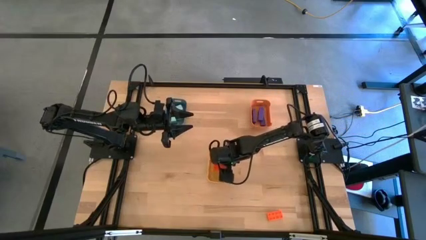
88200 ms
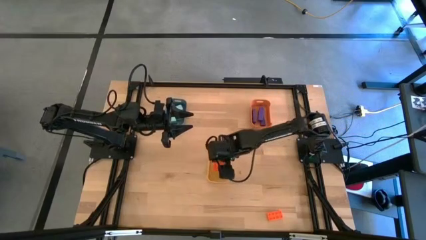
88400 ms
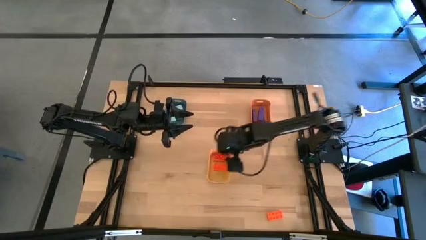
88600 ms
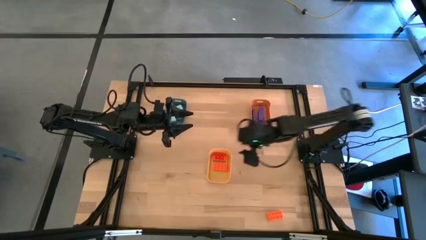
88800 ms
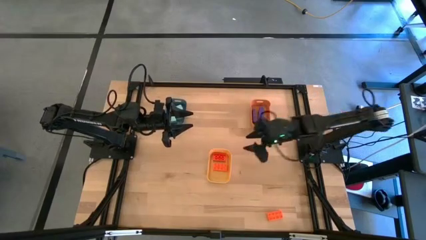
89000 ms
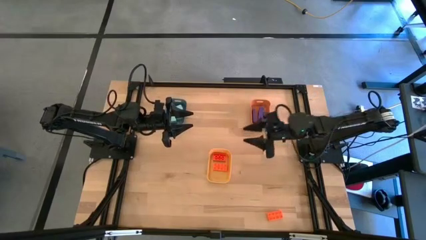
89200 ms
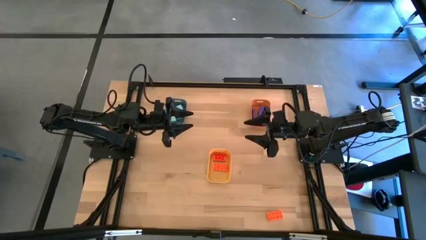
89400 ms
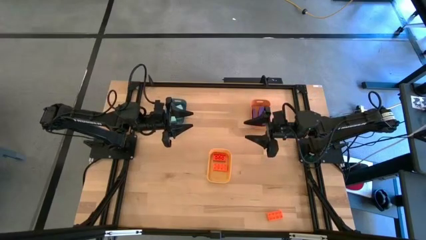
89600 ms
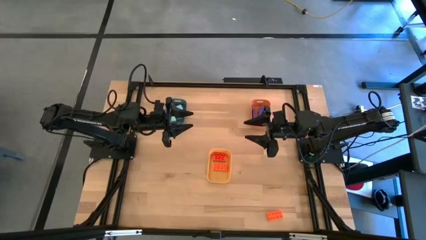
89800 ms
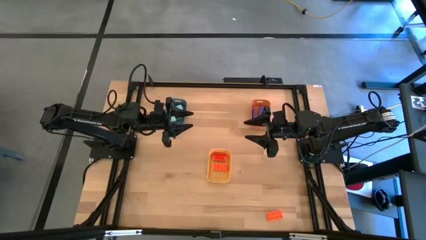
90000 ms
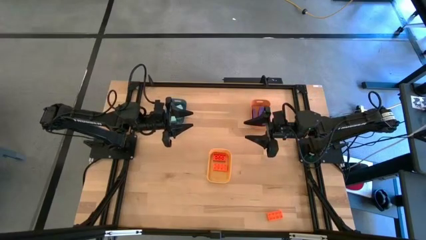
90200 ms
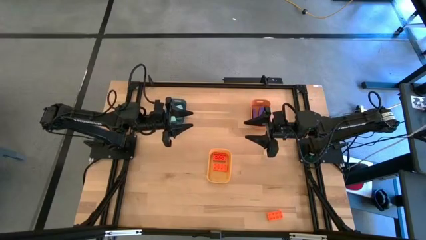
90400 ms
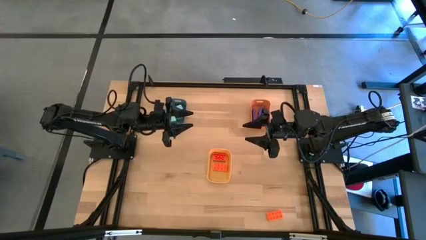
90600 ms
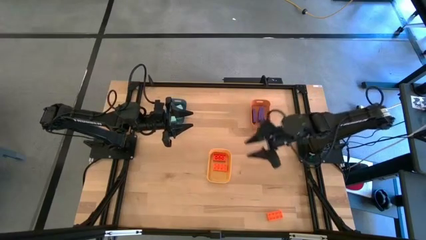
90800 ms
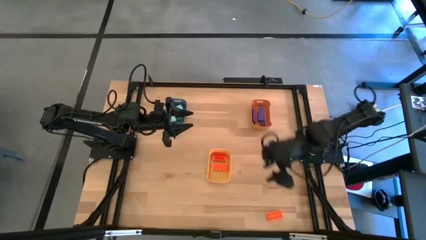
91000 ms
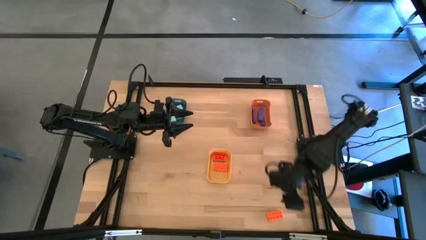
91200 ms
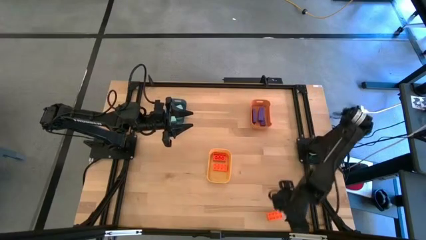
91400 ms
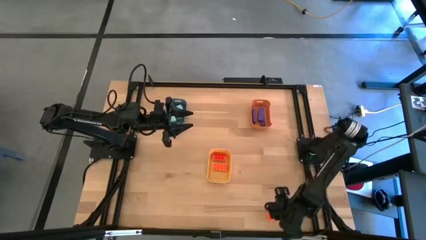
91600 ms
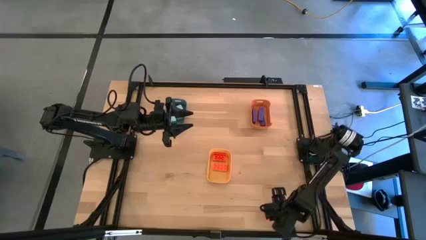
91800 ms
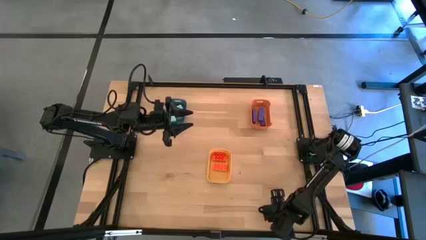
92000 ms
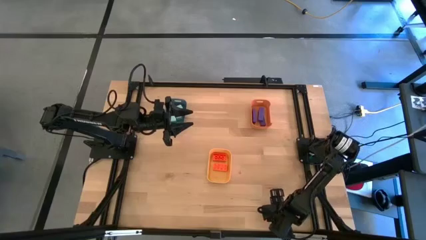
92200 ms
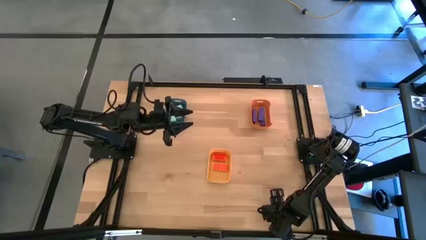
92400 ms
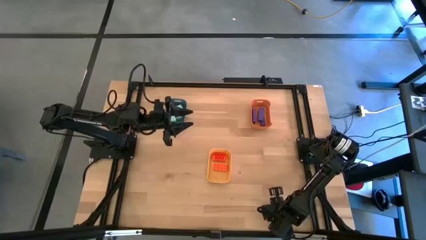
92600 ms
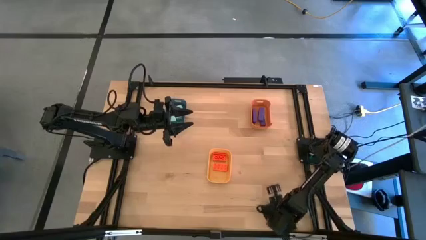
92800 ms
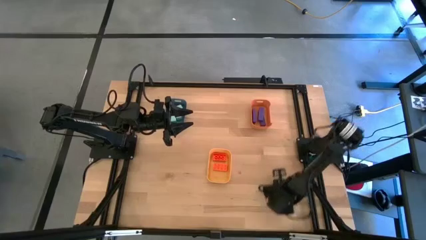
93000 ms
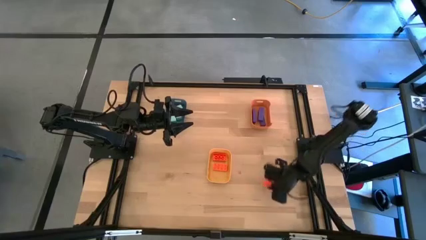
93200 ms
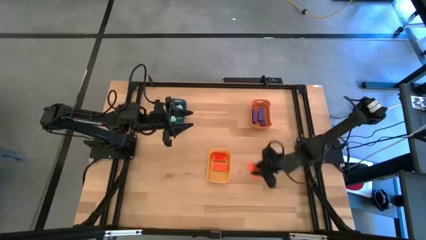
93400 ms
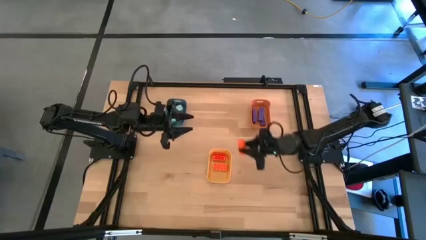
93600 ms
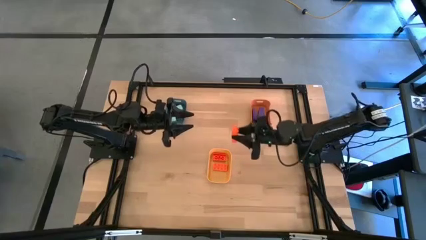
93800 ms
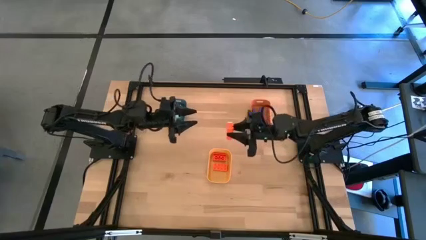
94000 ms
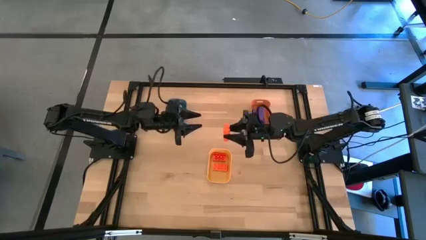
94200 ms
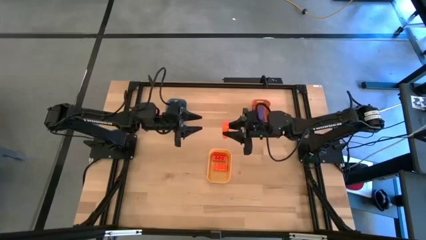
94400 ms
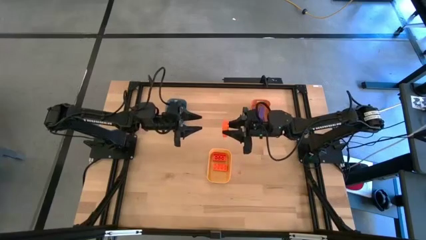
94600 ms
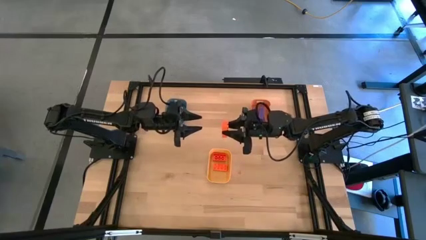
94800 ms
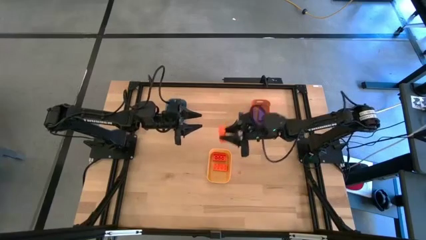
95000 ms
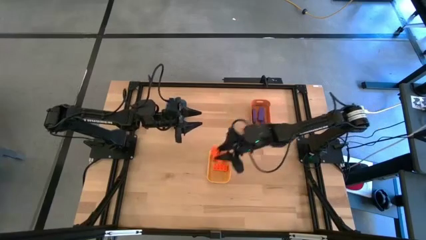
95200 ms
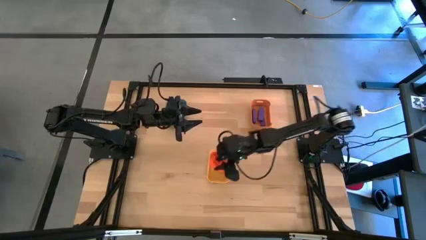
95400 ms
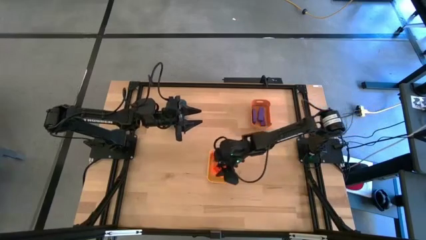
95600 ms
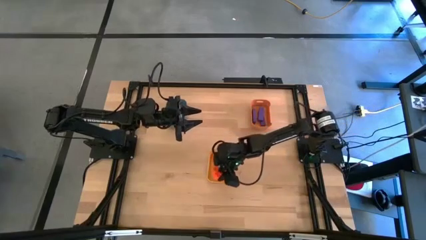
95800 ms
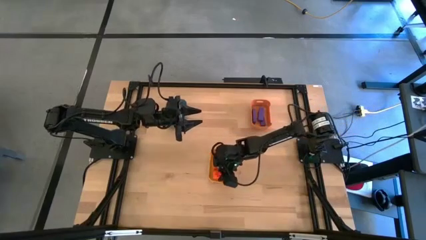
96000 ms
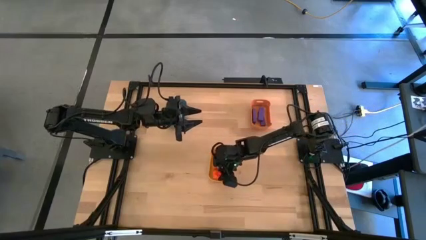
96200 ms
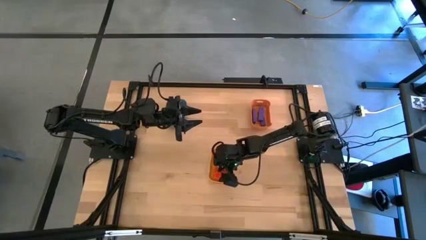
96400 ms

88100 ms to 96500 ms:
Task: Sort & place blocks by color
Put the orange game piece into the yellow bin

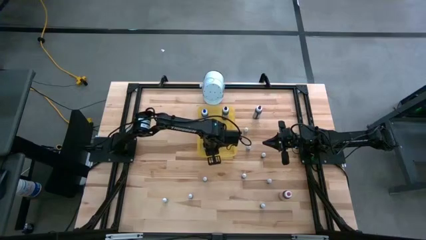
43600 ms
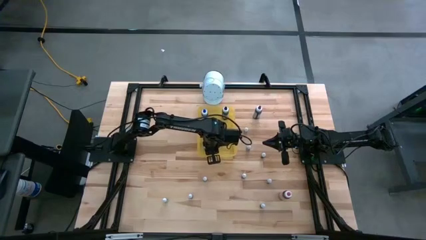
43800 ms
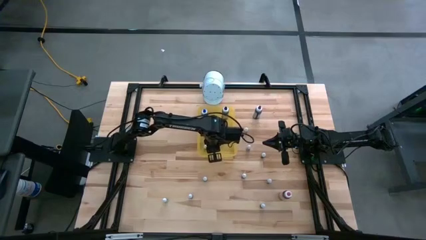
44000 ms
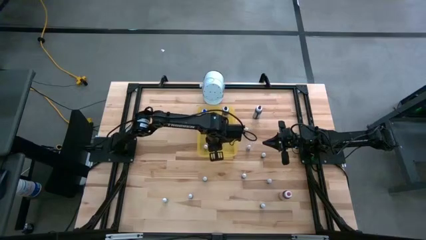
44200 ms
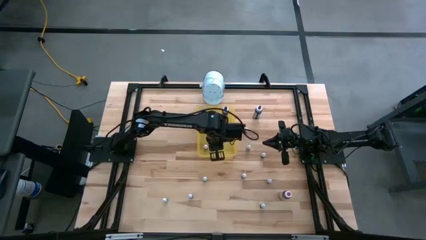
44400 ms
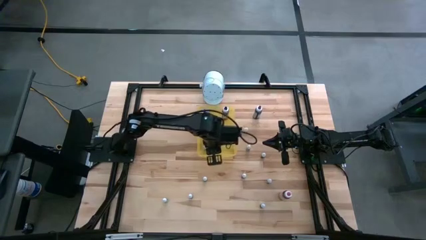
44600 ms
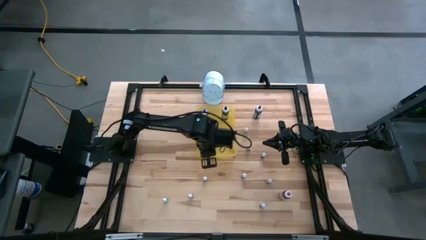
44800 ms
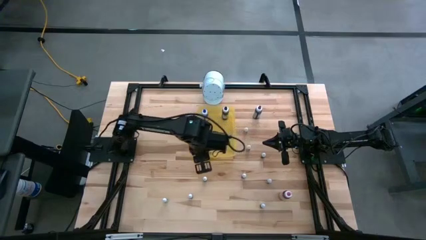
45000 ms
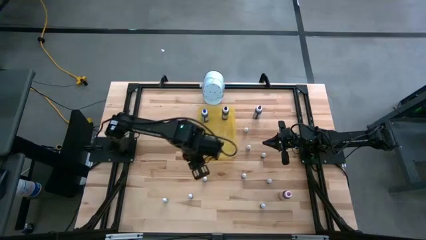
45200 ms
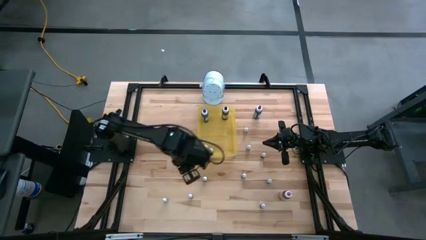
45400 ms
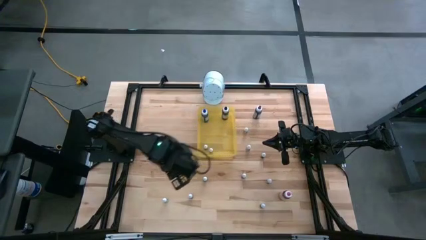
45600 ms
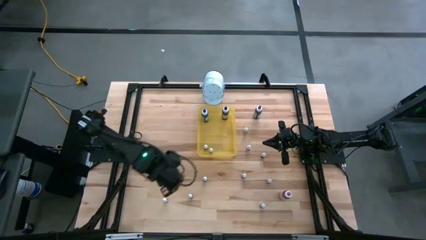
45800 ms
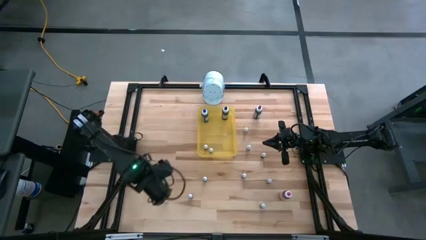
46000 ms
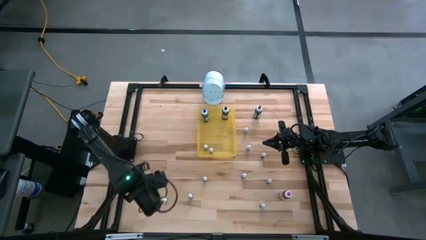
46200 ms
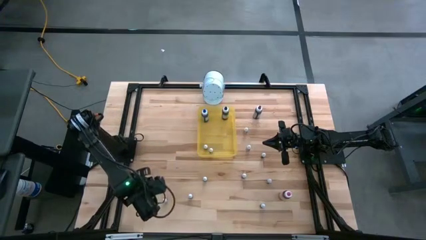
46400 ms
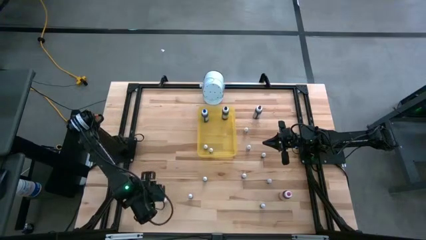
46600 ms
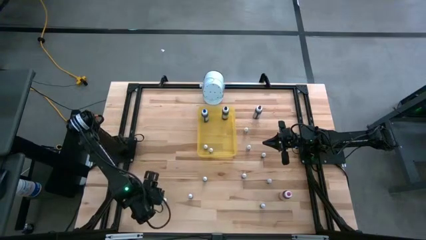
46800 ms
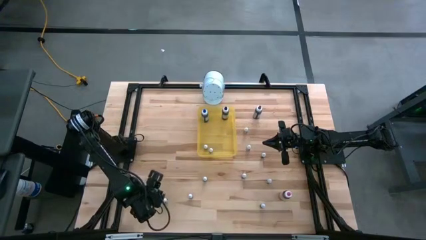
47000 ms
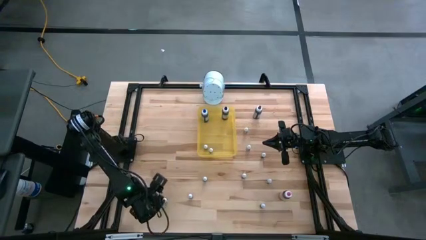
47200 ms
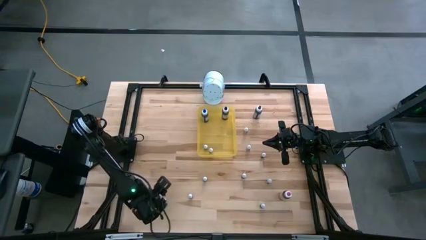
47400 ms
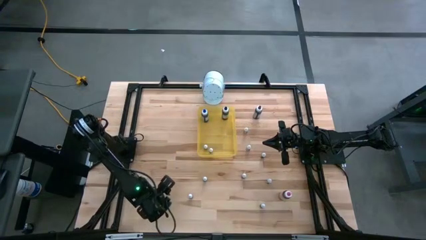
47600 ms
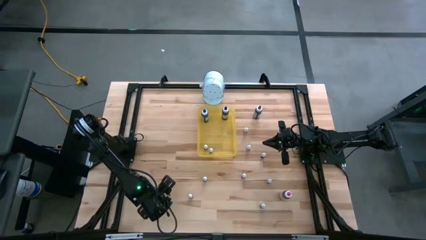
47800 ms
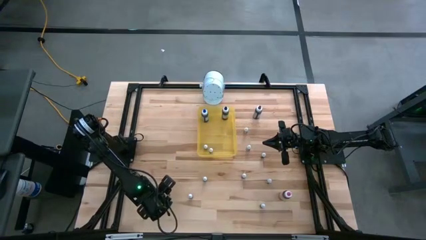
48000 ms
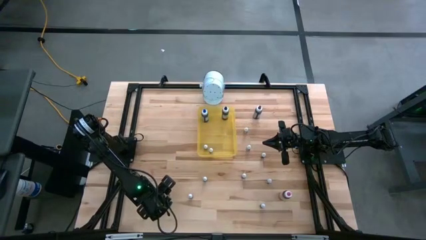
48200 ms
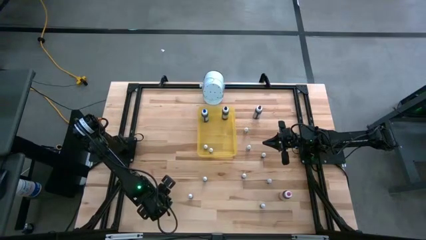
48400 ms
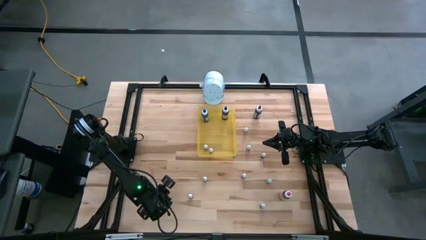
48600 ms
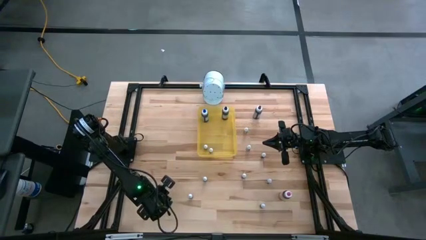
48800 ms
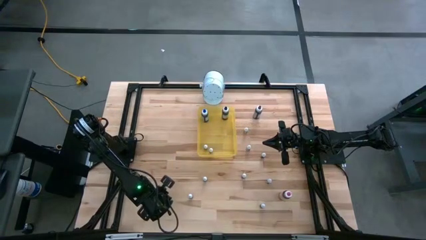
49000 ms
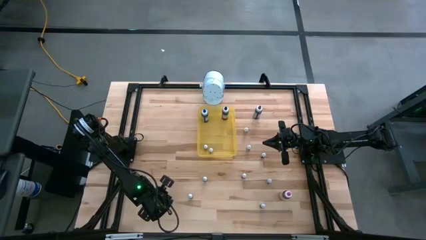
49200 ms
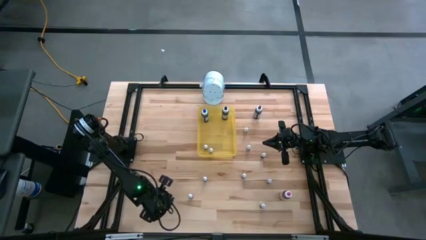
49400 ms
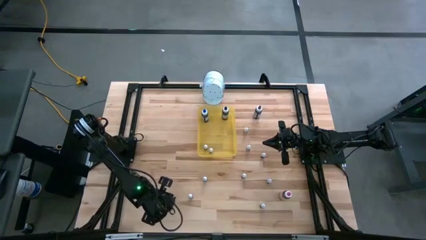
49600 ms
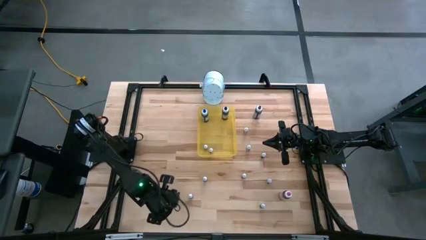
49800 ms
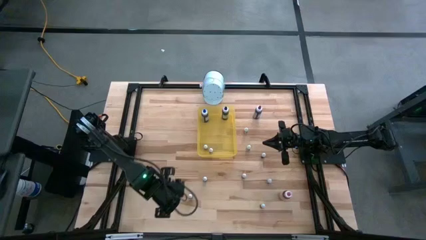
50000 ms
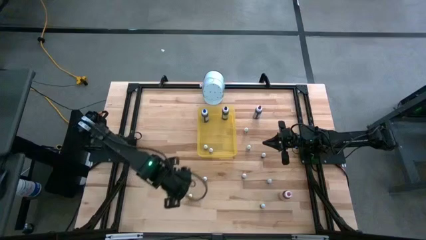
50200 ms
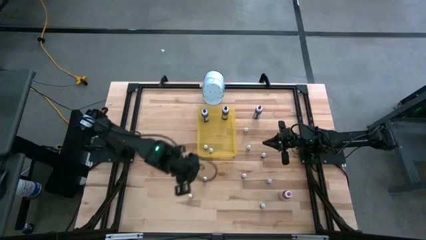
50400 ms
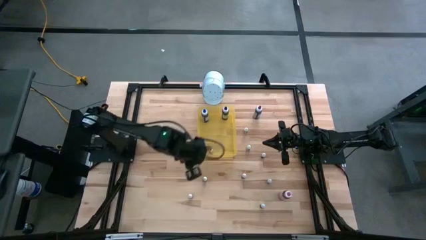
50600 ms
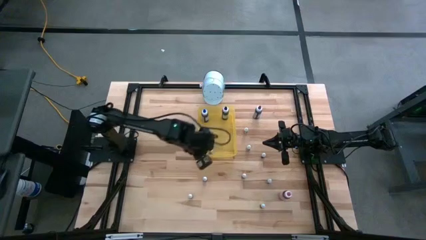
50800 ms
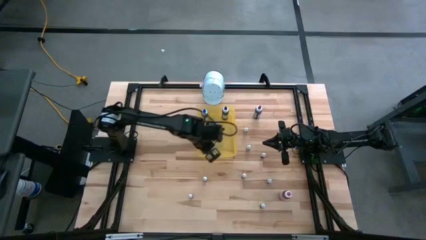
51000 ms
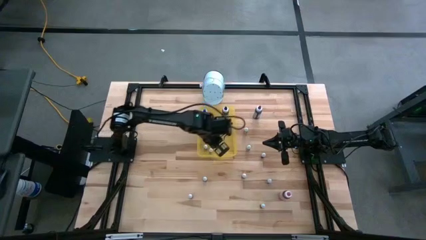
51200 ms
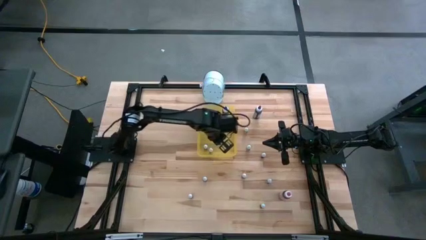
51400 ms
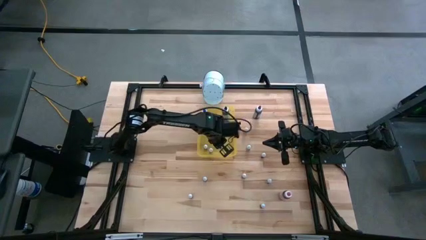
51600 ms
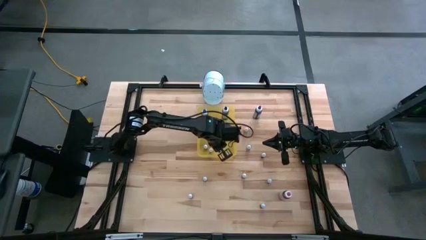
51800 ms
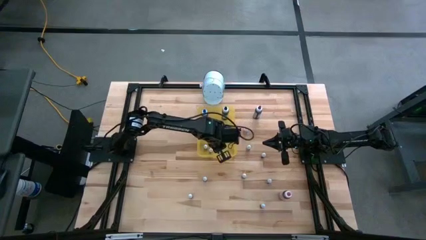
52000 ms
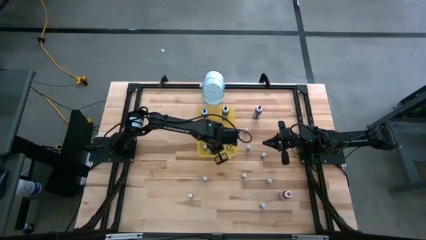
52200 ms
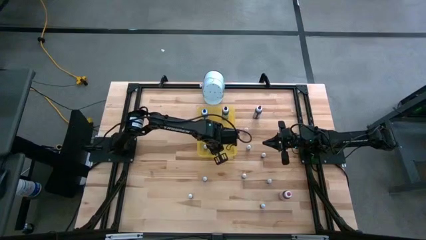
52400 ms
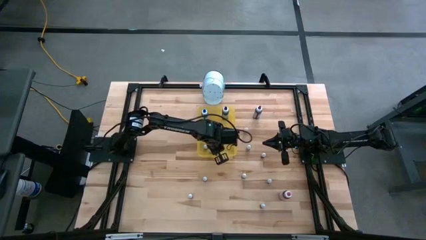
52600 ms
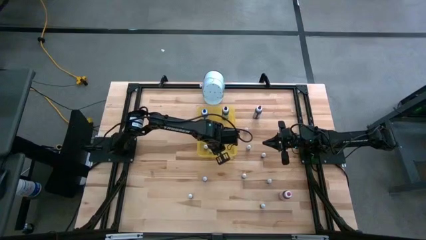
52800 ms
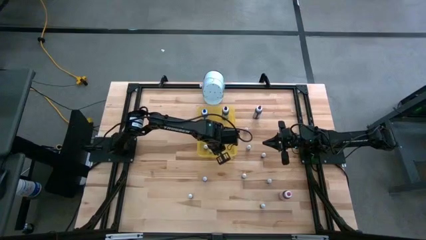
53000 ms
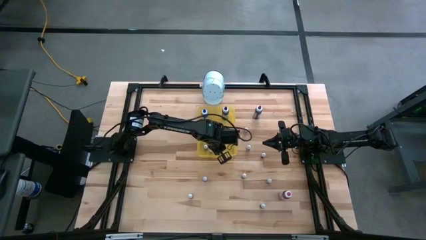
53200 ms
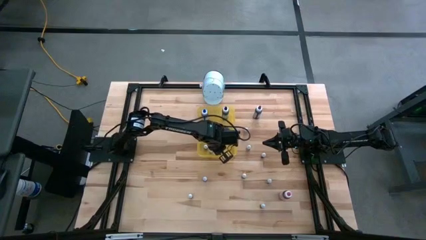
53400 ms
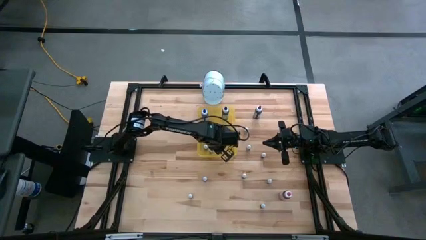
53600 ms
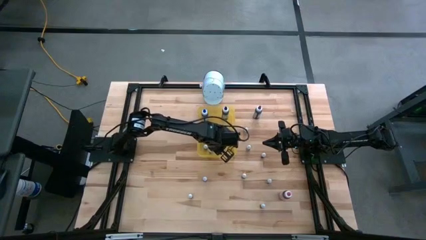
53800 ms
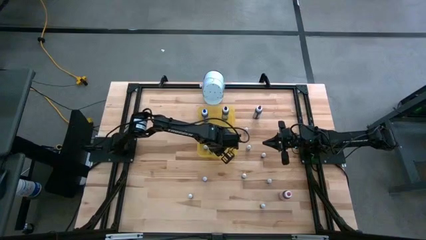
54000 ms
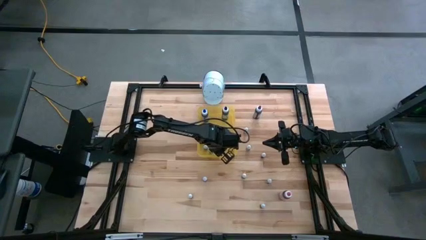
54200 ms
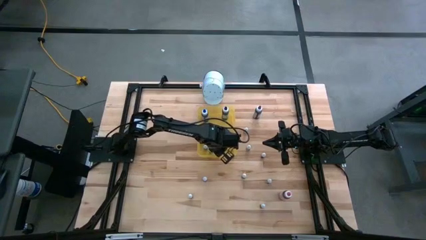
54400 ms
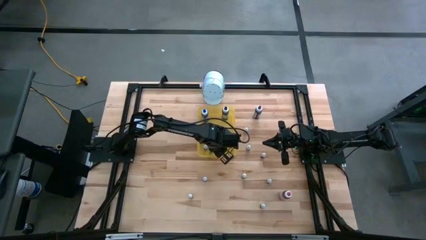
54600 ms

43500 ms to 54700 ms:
Task: Pick & Place food coloring
Put the small purple food coloring bottle in the yellow transparent bin
